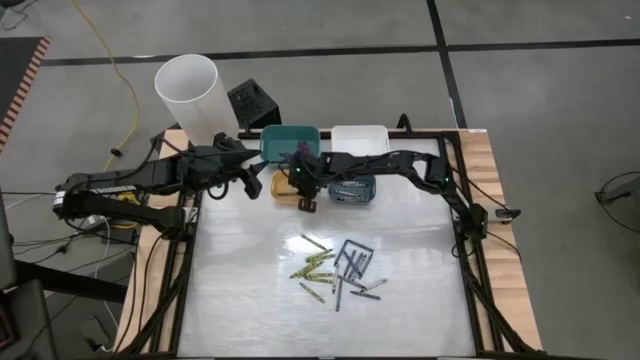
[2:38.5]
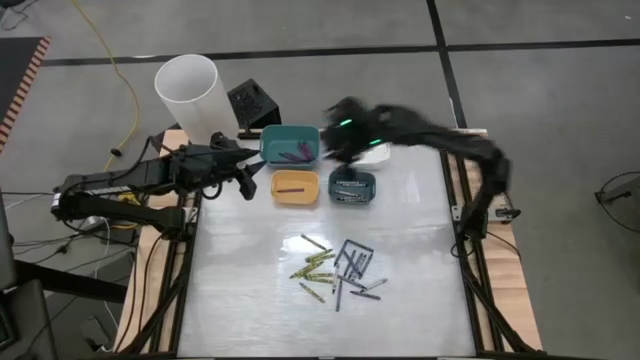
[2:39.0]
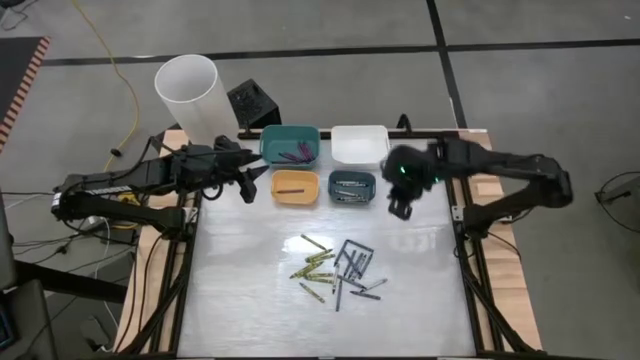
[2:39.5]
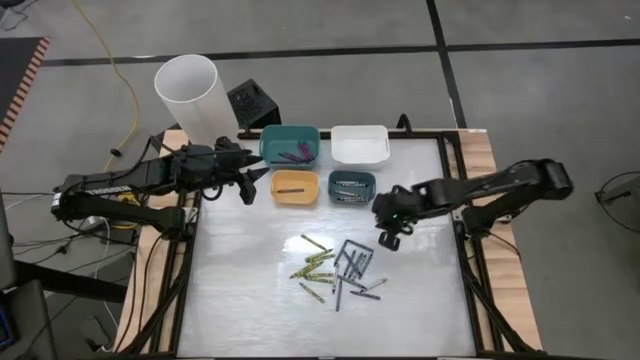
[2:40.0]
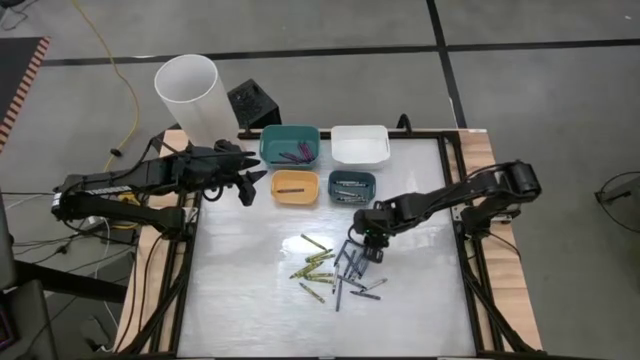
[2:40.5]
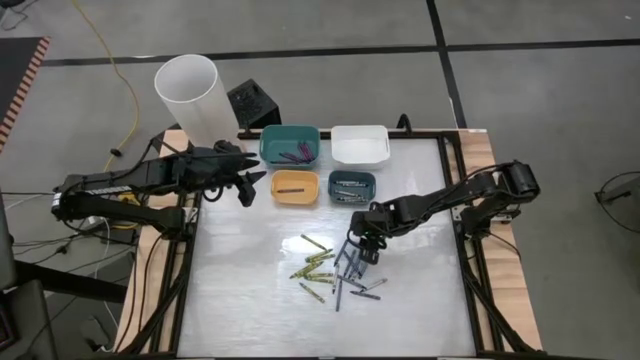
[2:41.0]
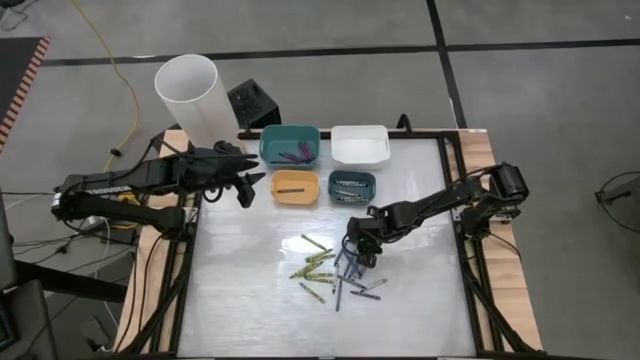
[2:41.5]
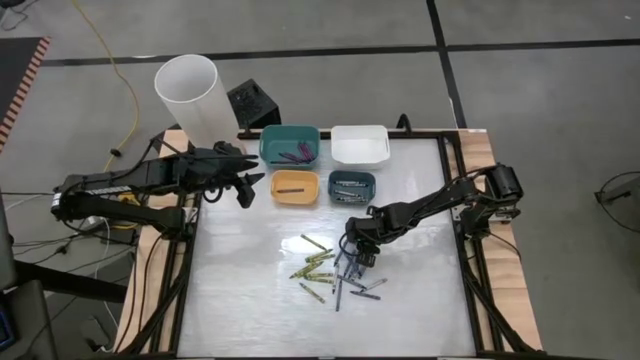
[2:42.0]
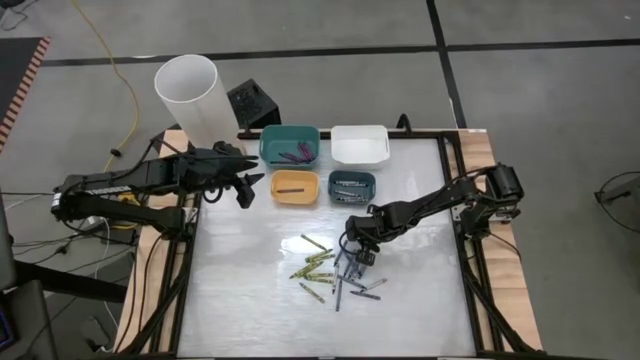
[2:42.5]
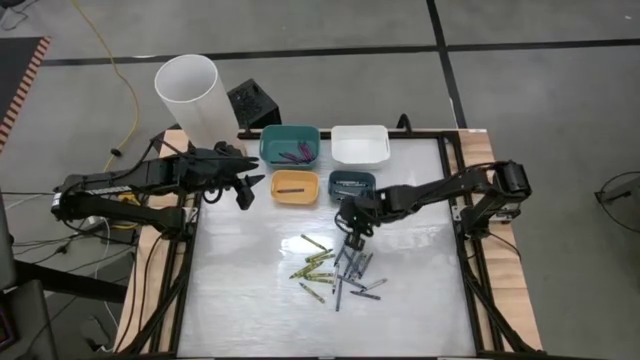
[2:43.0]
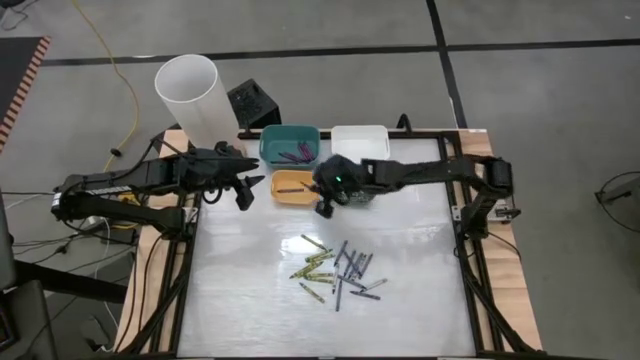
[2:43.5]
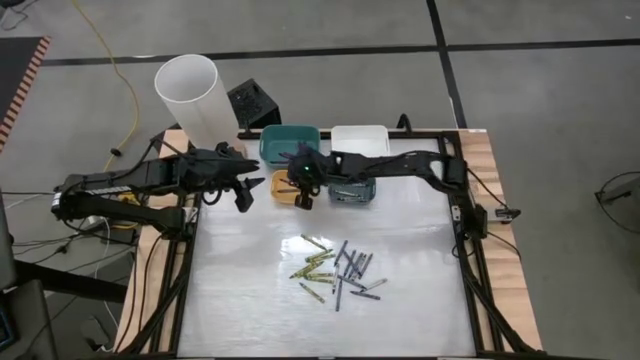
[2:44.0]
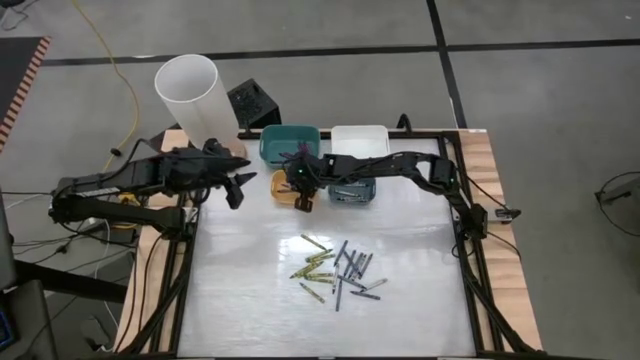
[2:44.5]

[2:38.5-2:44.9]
Task: Sort crayons
Put the blue crayon into the yellow bin

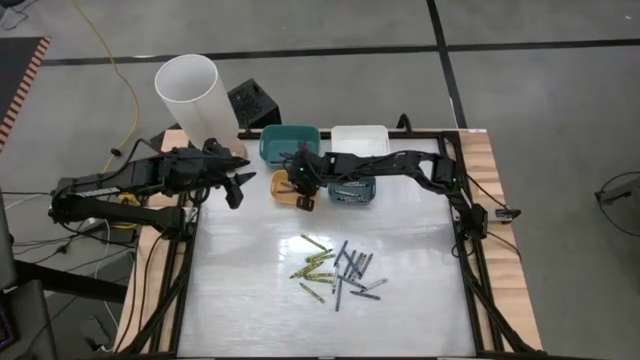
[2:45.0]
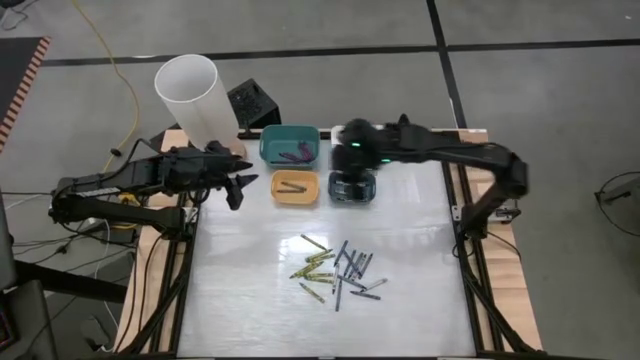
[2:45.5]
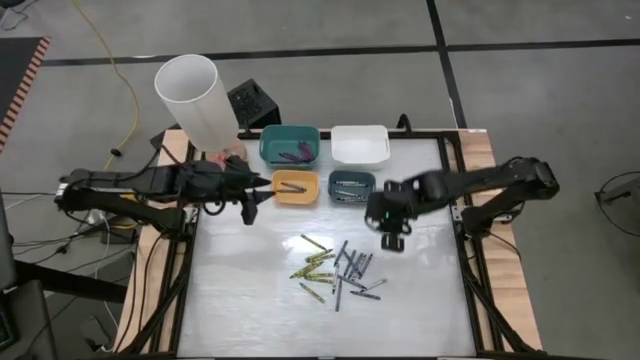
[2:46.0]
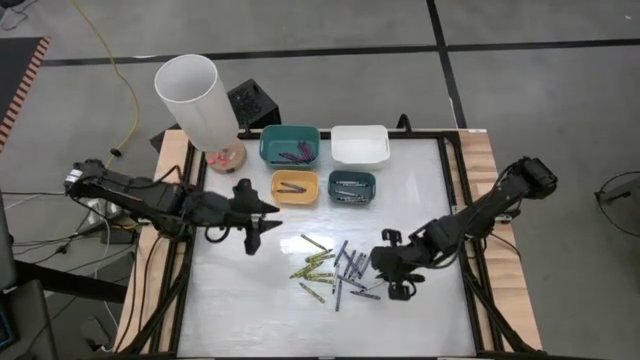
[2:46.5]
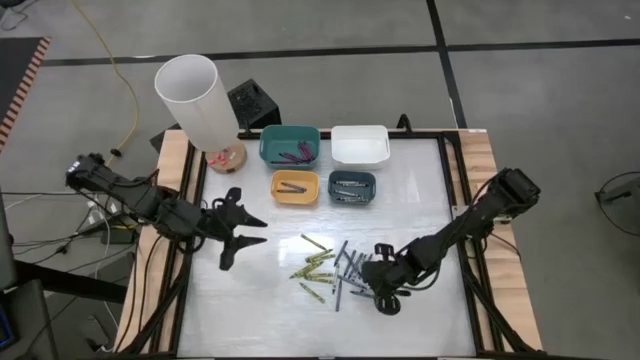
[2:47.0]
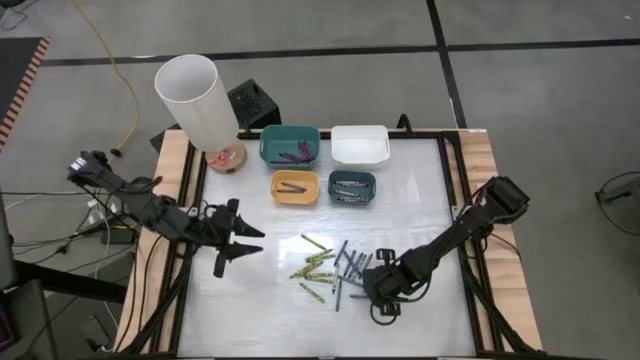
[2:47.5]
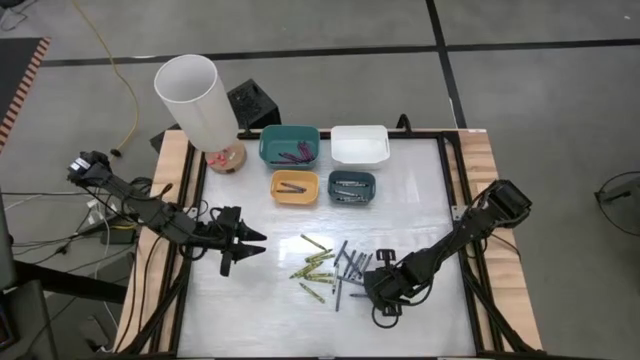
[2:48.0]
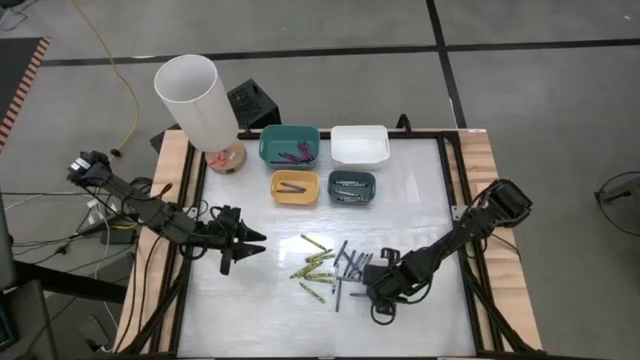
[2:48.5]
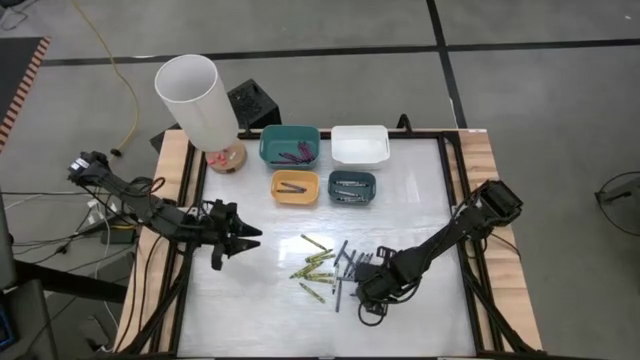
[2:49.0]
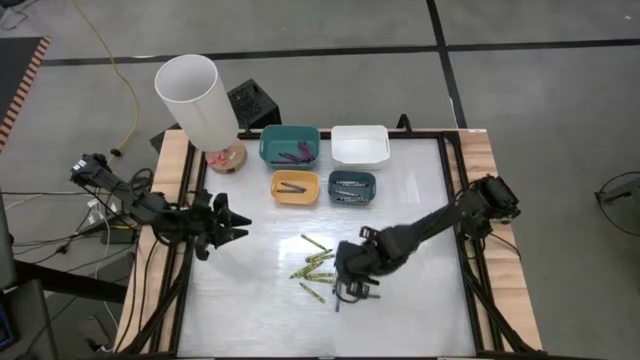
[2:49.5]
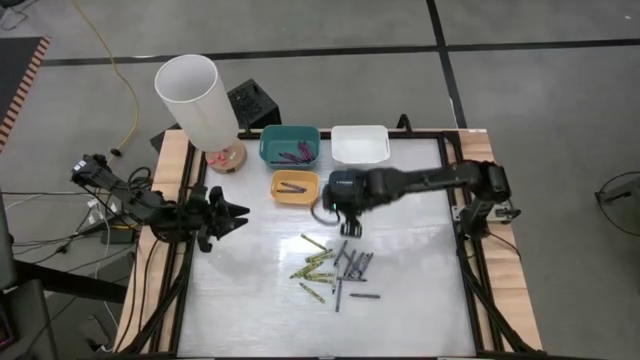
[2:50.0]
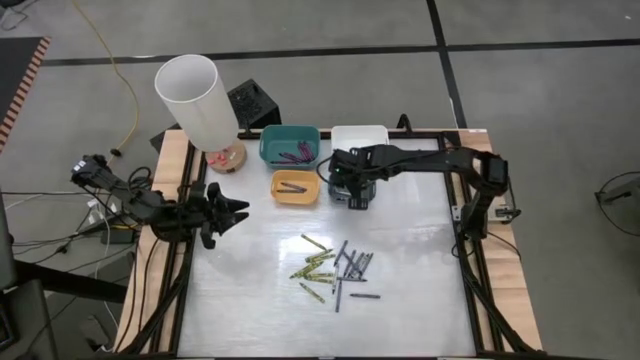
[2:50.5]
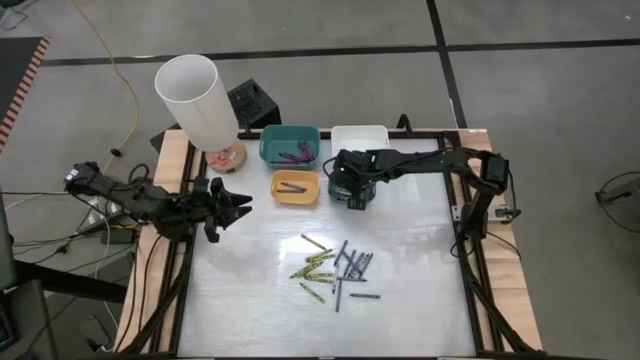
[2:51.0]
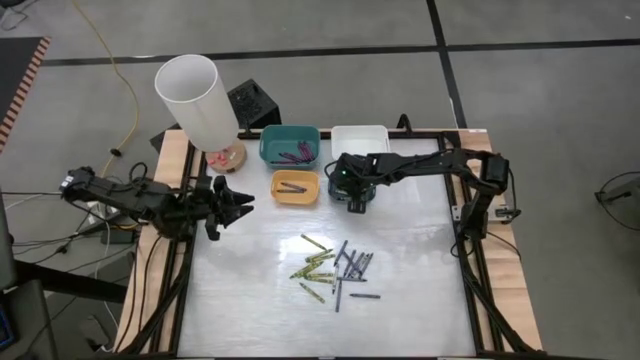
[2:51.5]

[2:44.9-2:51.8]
Put the black crayon into the blue bin

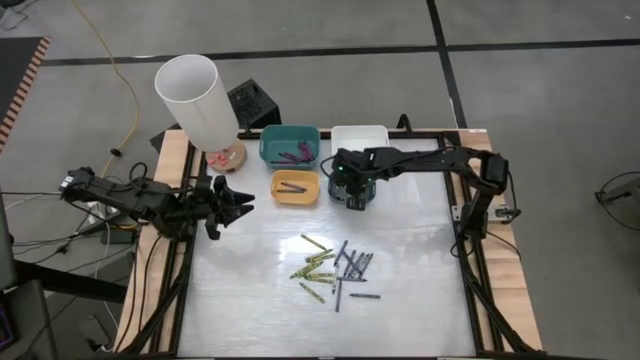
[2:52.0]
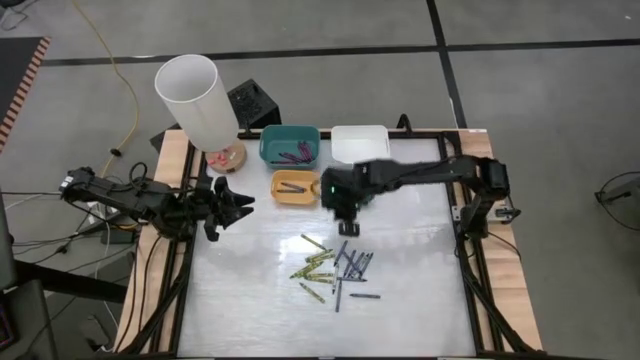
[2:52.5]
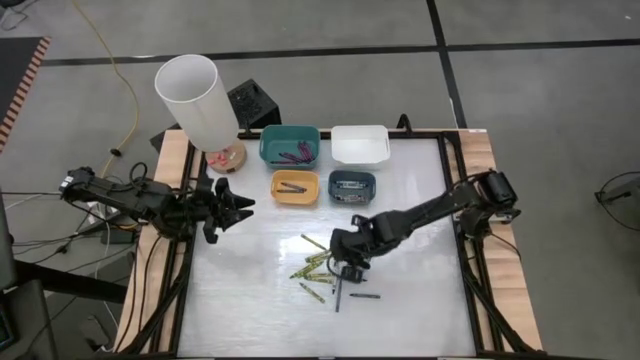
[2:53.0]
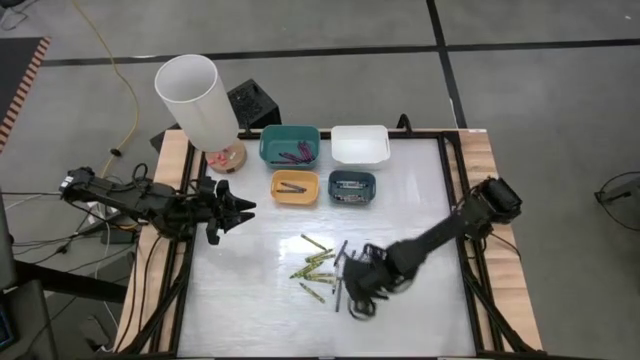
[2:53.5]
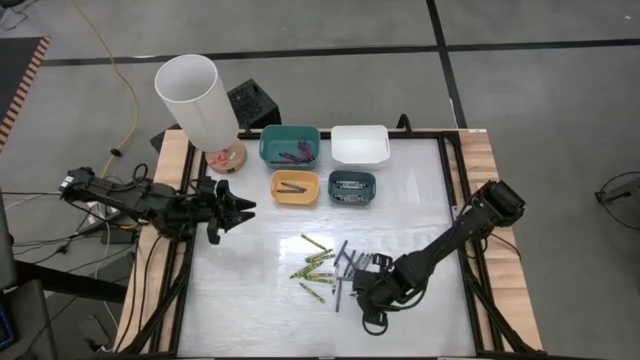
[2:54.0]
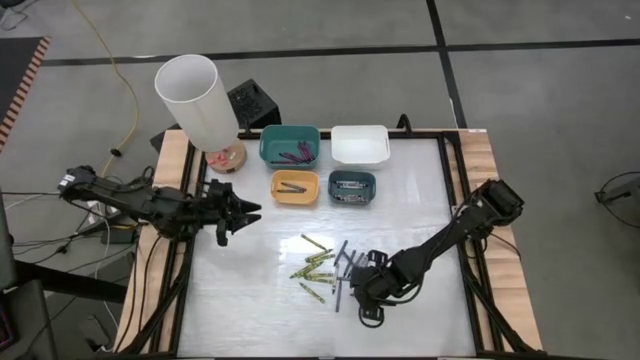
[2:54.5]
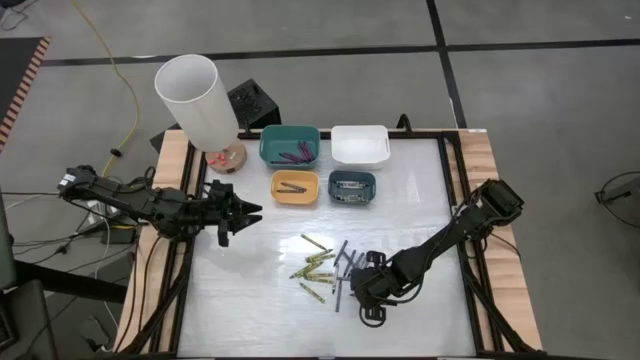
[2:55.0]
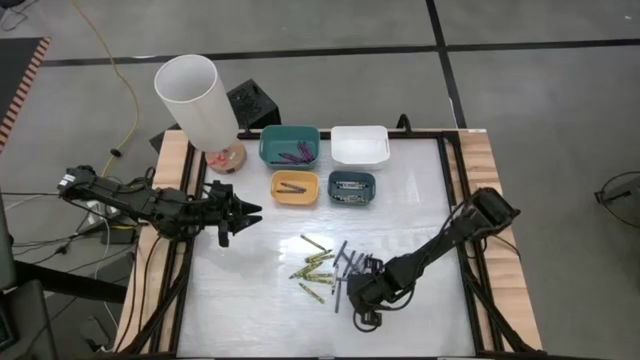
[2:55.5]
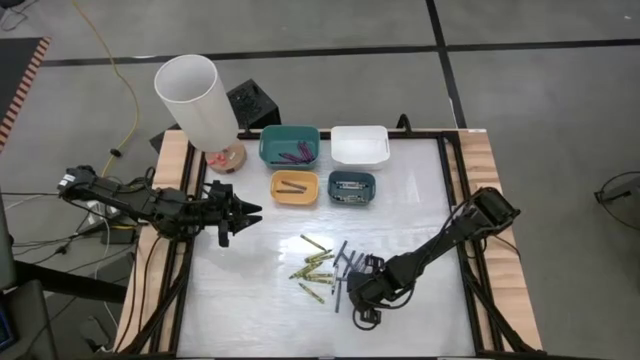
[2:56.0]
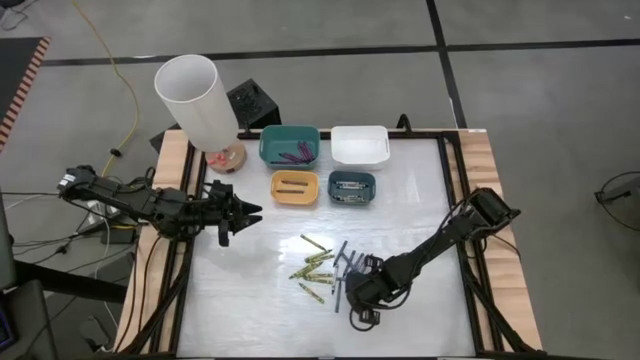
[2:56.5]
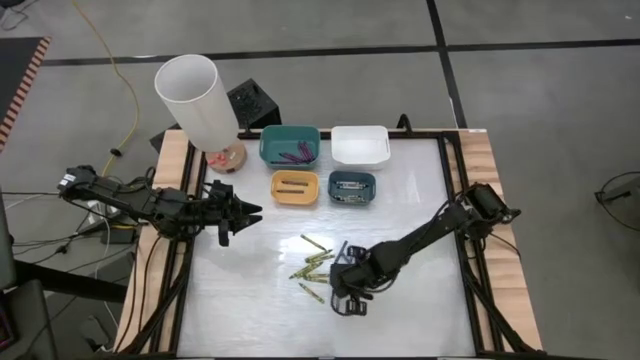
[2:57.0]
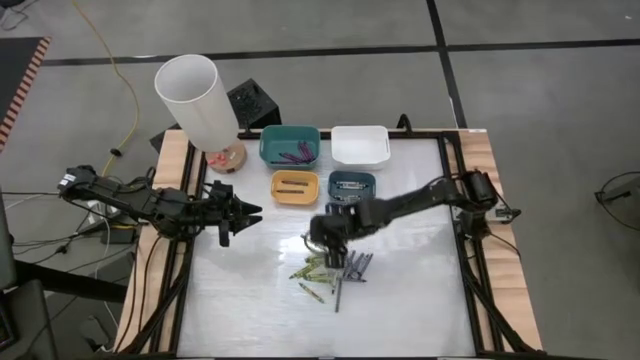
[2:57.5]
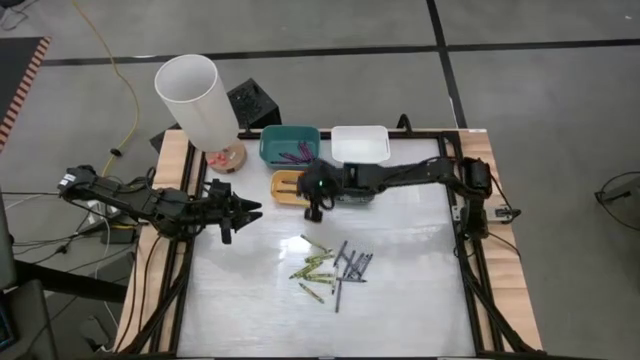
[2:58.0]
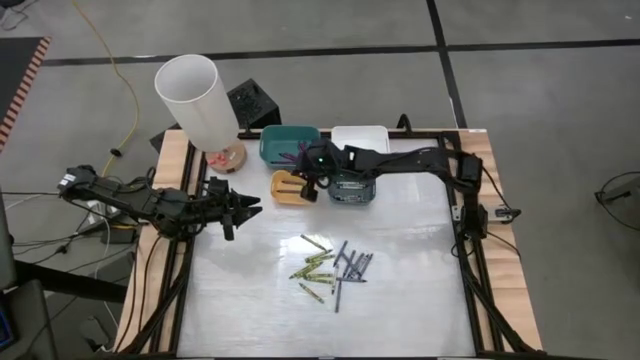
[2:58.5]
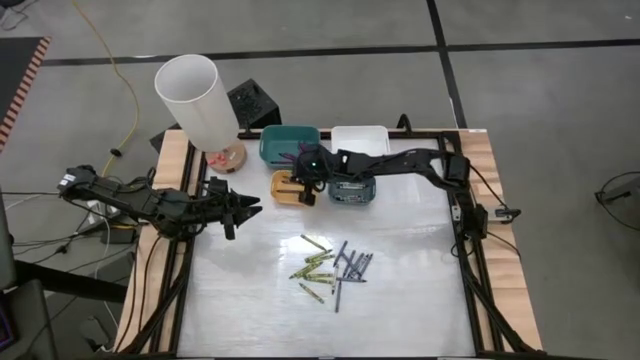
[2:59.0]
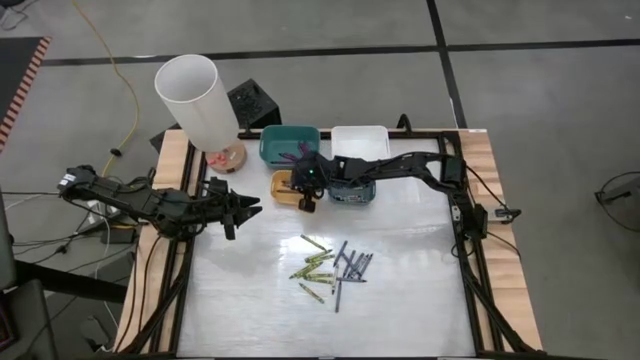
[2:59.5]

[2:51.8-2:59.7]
Put the blue crayon into the yellow bin
